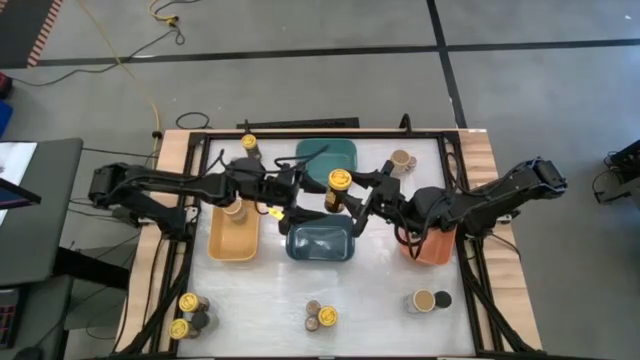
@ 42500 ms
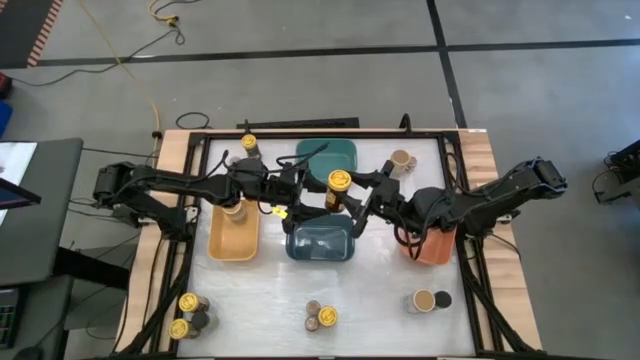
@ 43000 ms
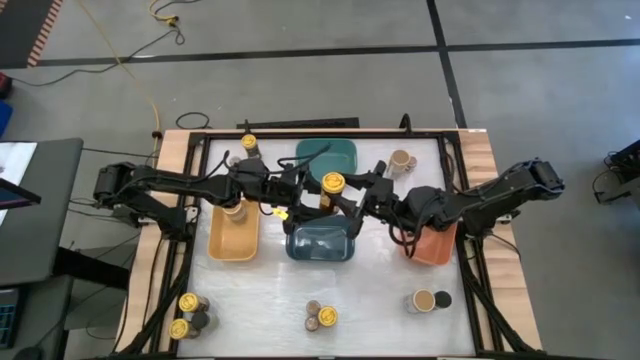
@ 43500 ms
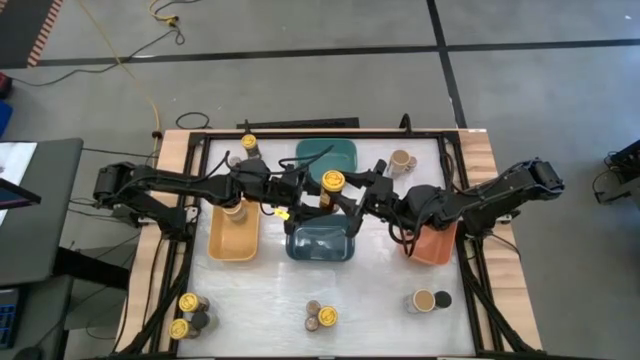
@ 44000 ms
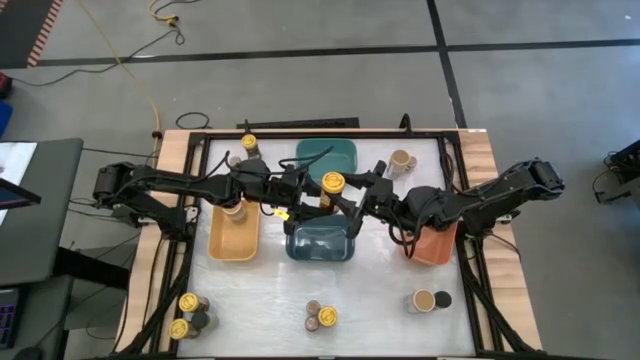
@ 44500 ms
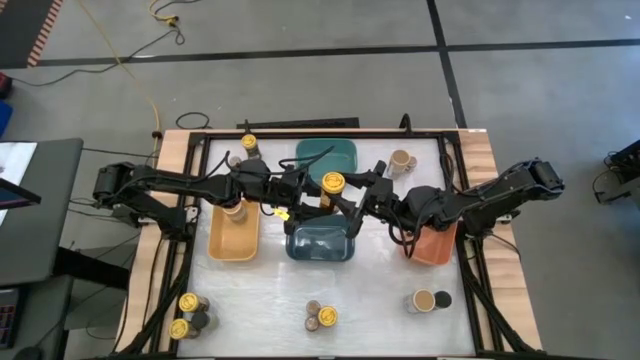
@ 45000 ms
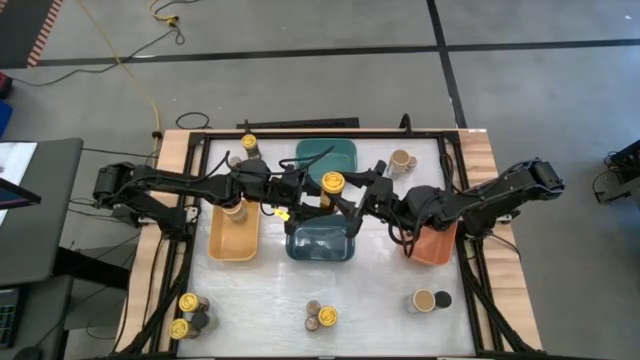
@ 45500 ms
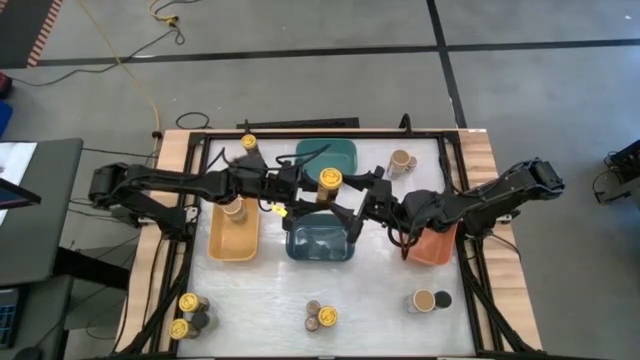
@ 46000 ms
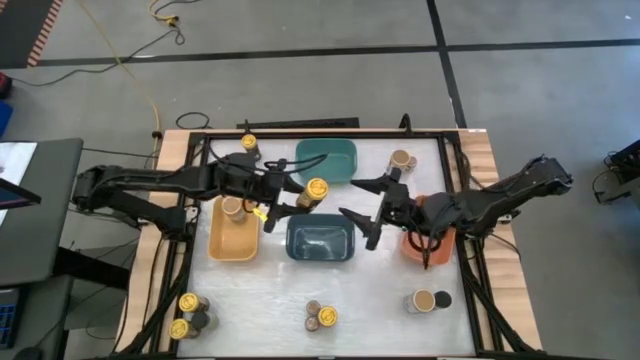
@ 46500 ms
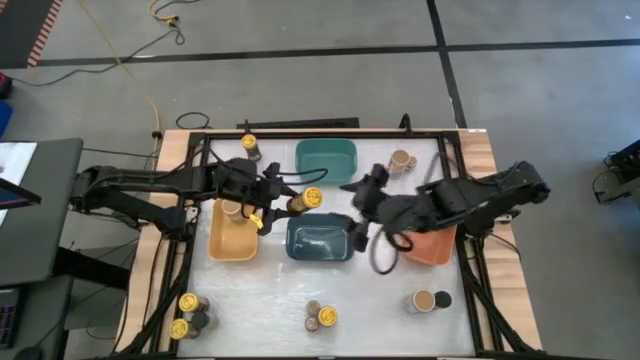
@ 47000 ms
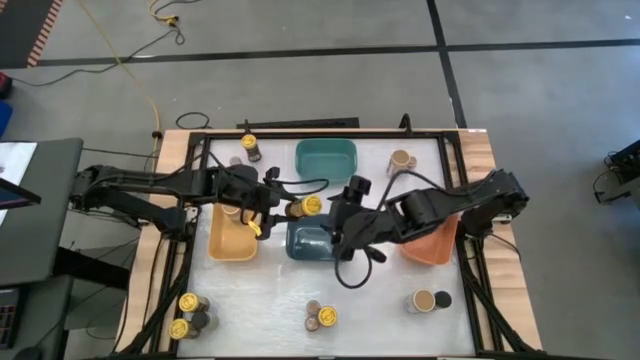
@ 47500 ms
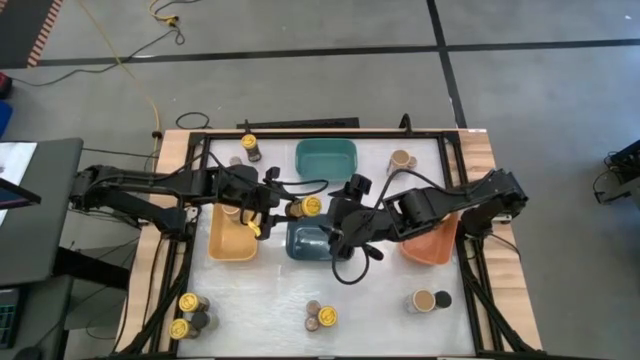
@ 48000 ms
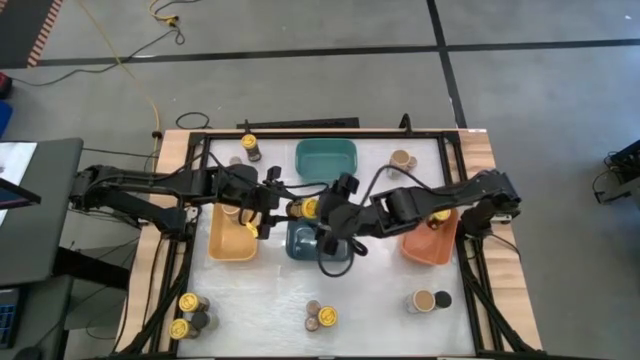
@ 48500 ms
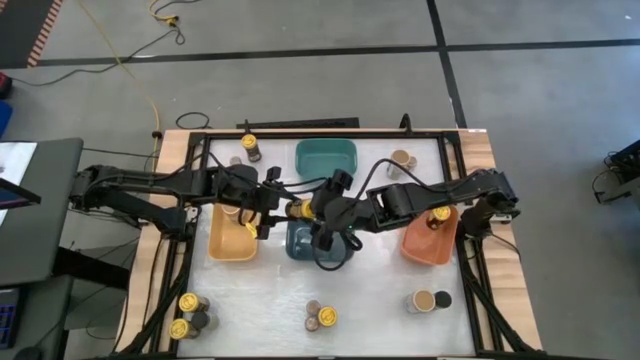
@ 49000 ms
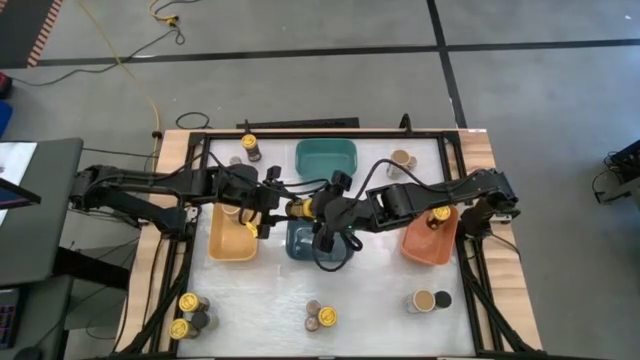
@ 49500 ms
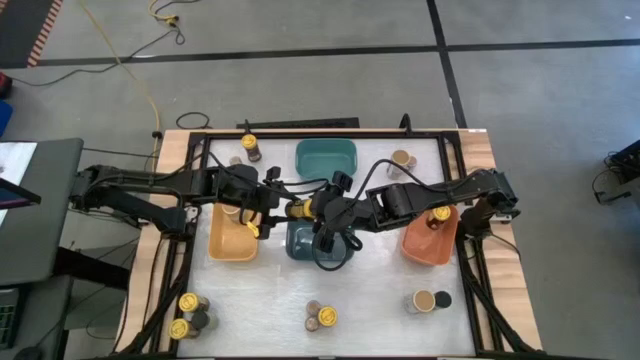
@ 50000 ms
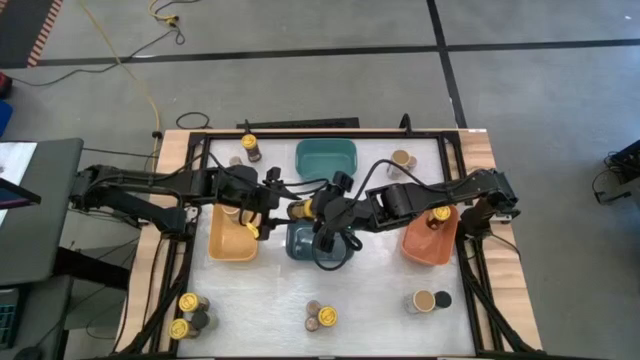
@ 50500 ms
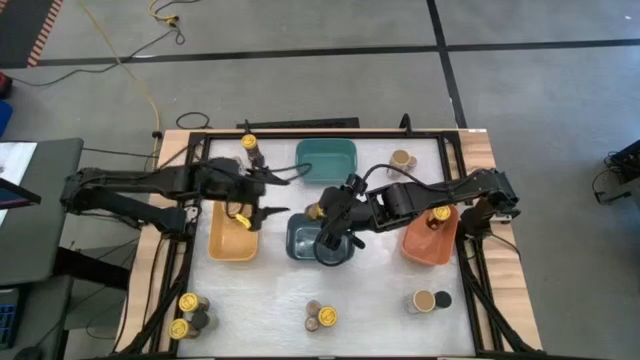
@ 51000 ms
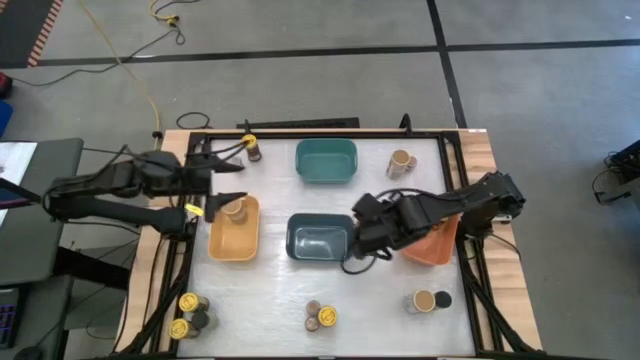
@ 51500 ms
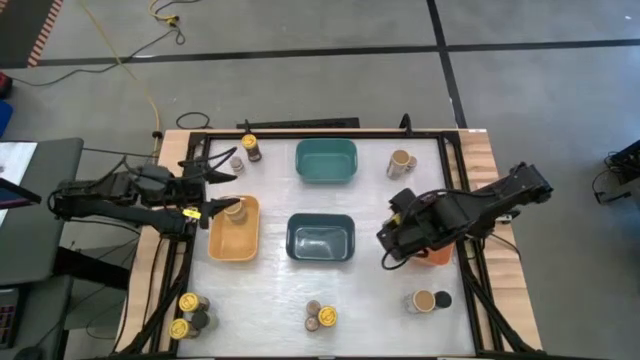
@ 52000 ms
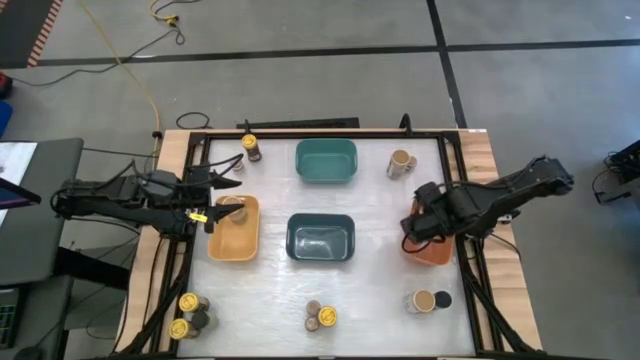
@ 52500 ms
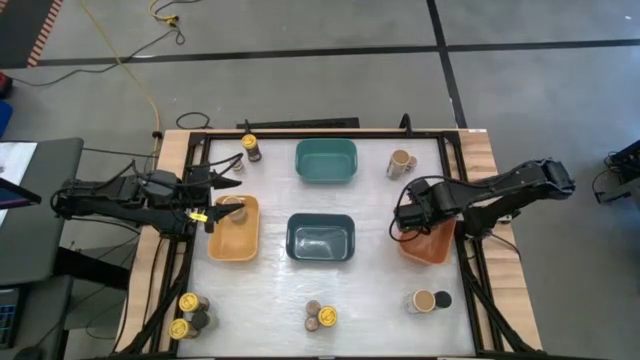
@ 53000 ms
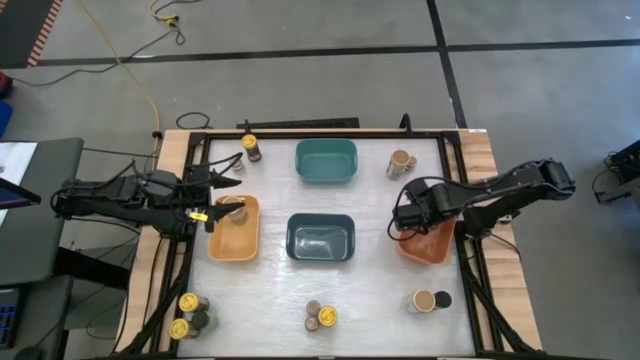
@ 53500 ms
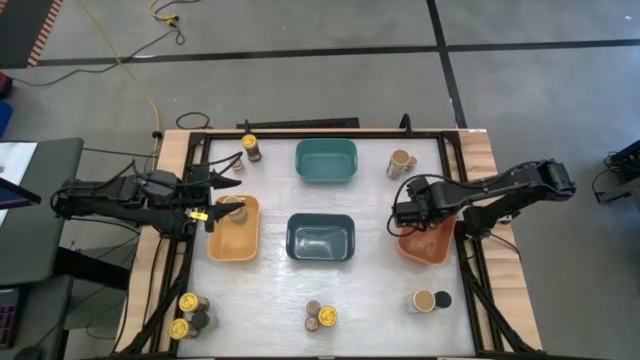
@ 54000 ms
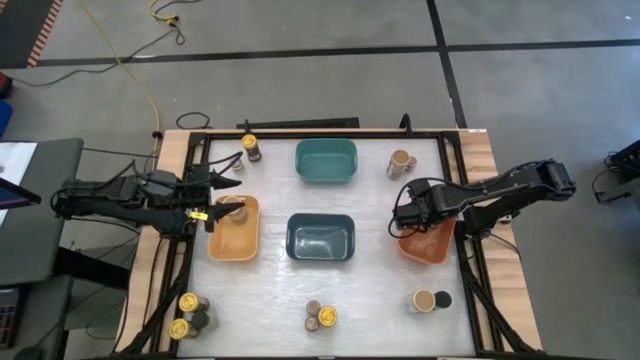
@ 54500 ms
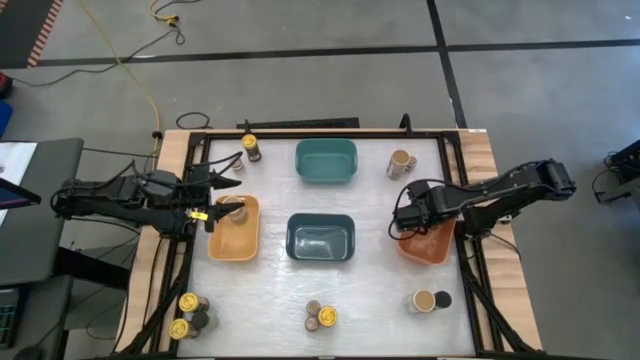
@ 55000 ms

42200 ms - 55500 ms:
Task: Sort spices by type
Put the yellow seasoning bottle into the orange bin

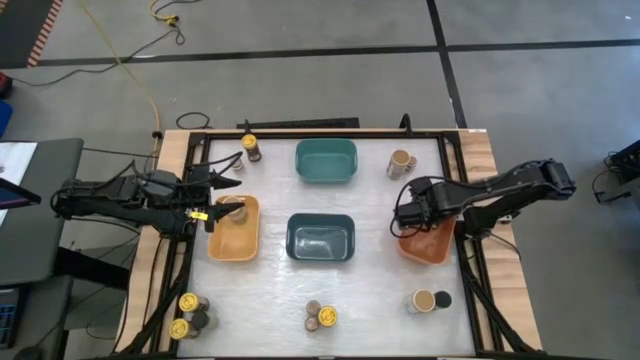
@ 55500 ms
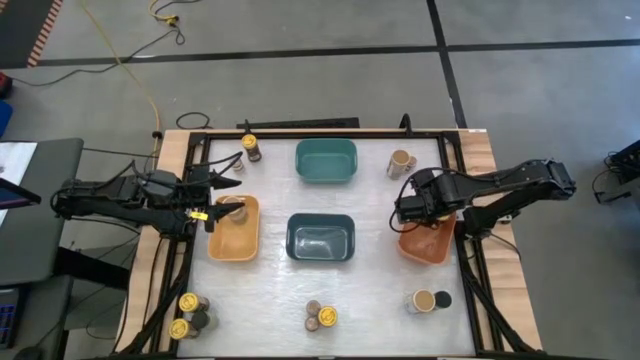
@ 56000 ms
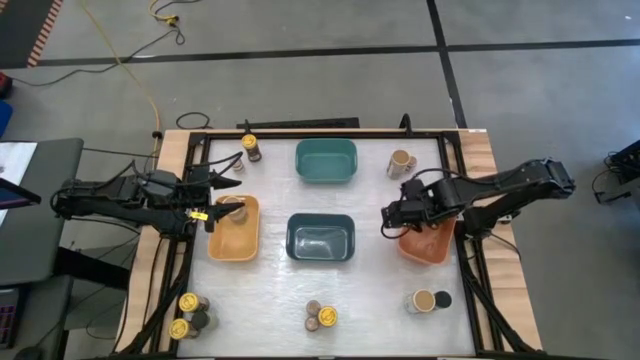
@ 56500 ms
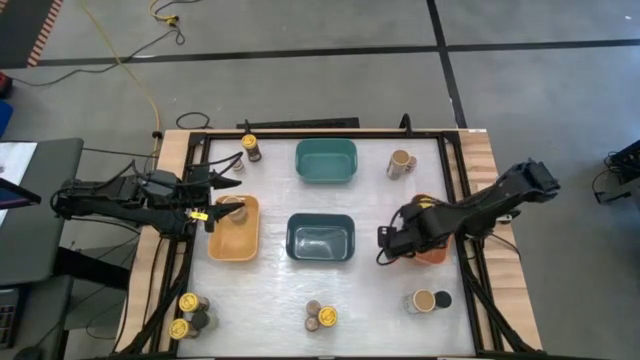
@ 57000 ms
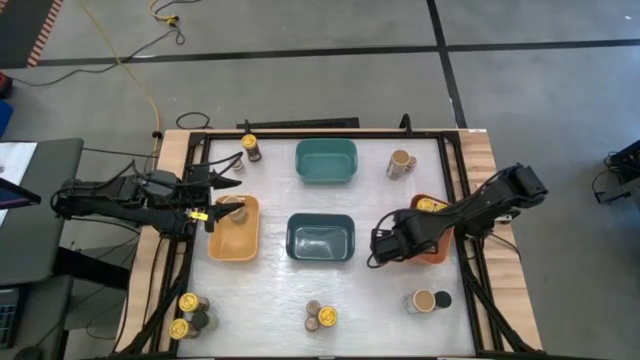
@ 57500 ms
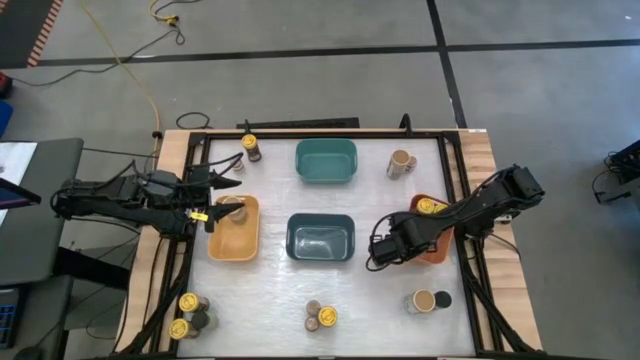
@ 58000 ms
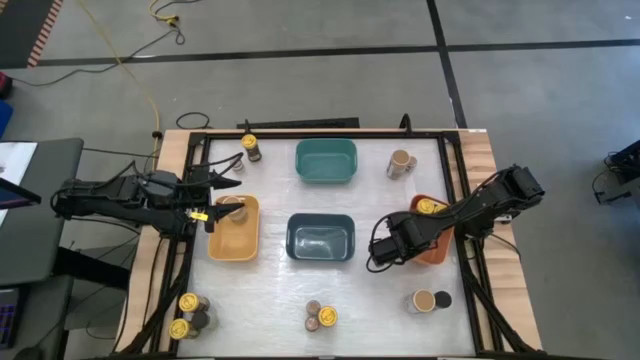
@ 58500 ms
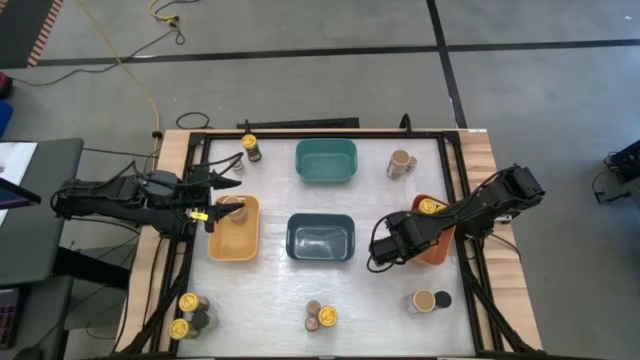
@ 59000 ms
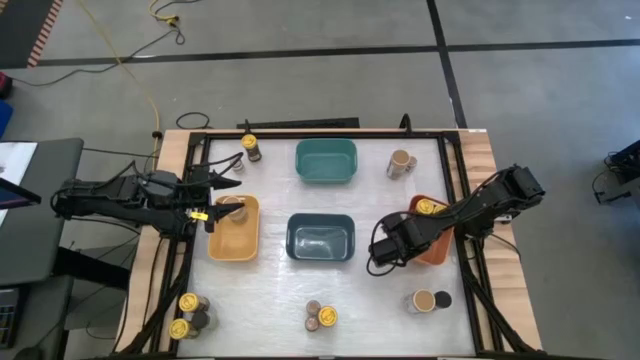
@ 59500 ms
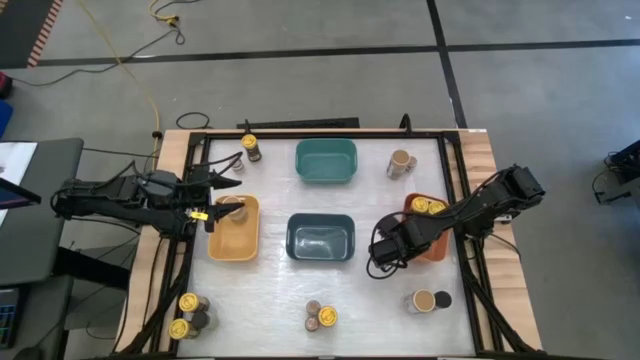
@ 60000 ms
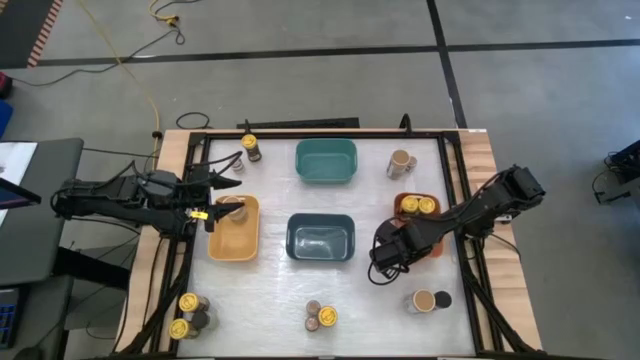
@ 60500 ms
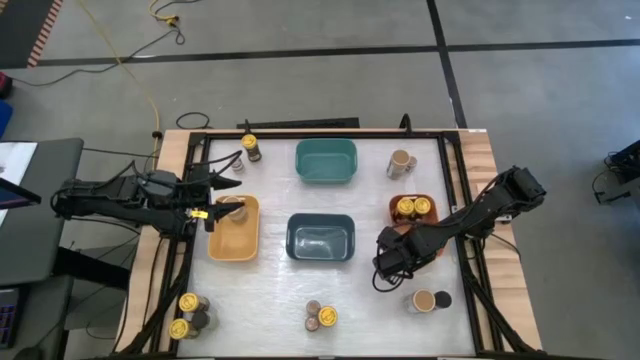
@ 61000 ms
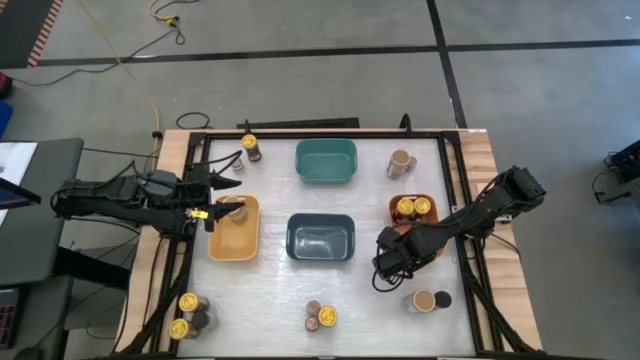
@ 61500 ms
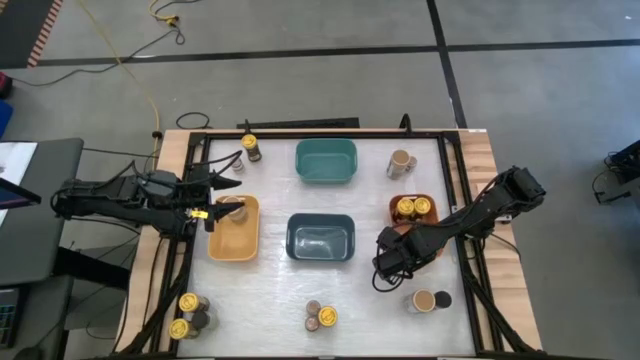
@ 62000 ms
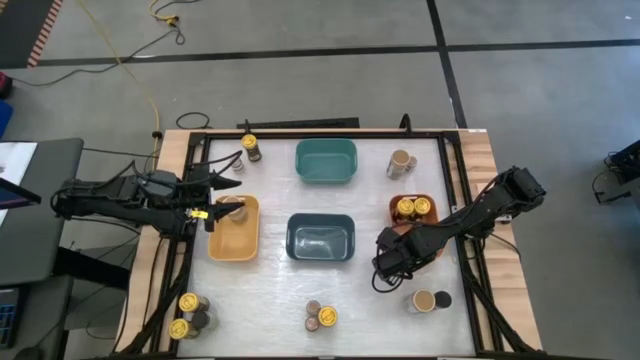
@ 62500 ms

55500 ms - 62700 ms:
Adjust the orange bin
